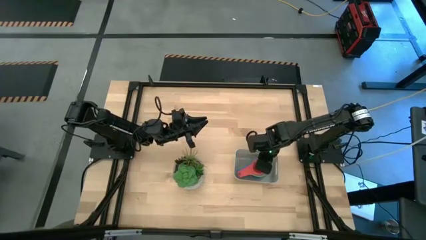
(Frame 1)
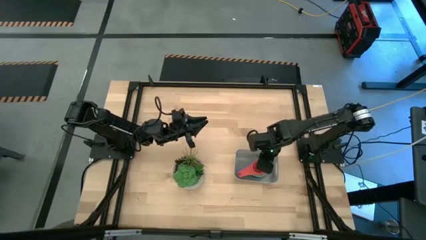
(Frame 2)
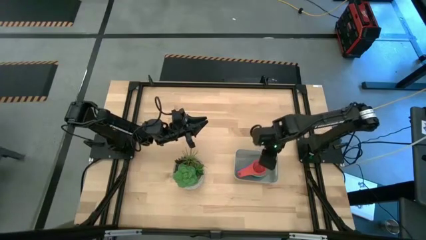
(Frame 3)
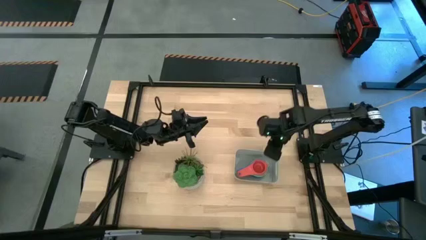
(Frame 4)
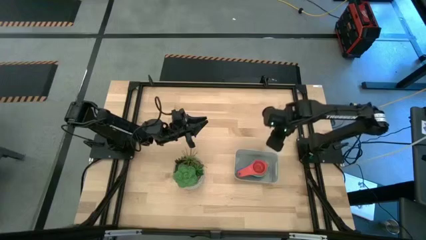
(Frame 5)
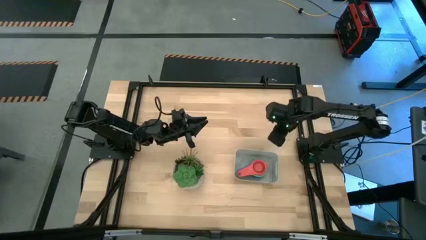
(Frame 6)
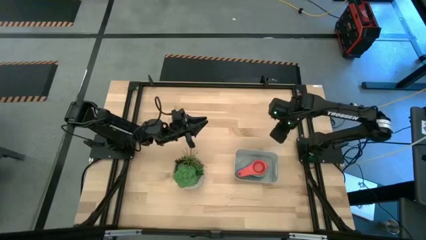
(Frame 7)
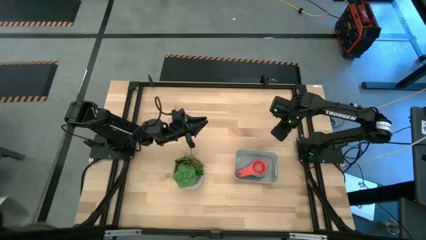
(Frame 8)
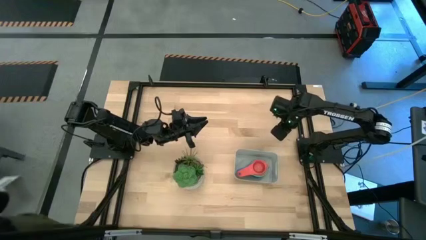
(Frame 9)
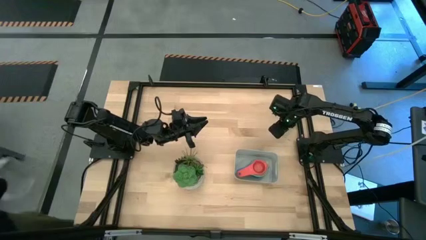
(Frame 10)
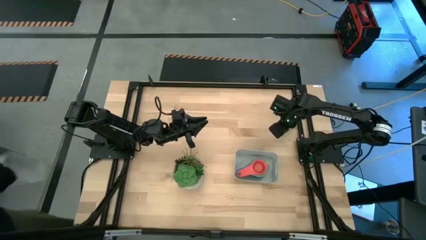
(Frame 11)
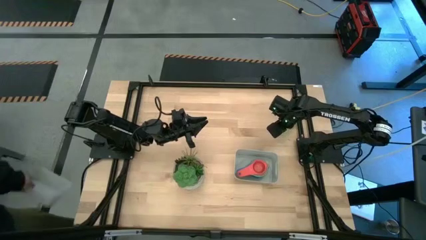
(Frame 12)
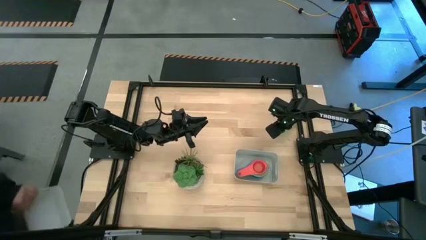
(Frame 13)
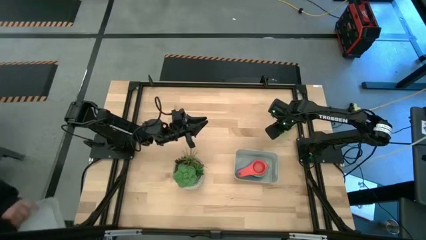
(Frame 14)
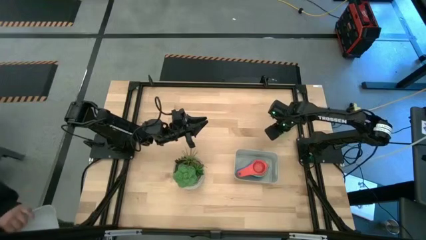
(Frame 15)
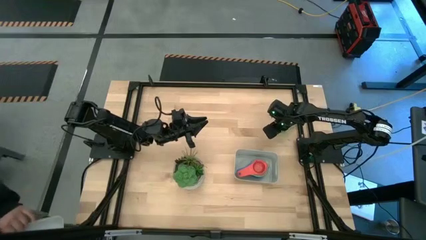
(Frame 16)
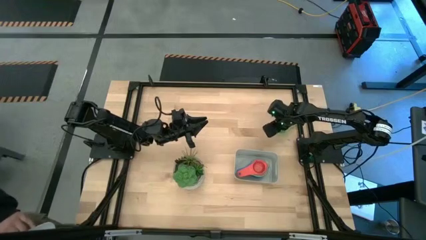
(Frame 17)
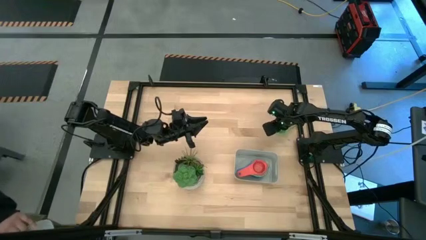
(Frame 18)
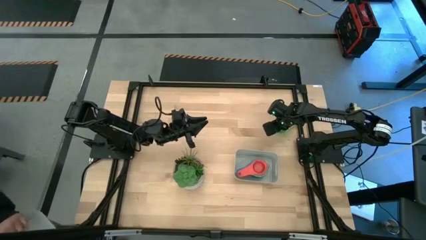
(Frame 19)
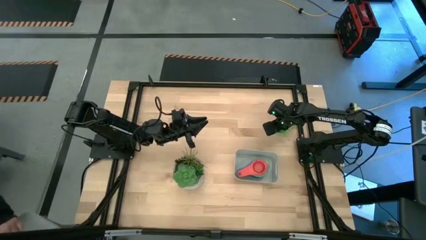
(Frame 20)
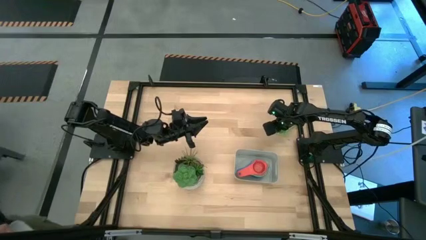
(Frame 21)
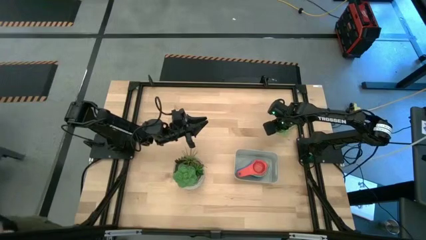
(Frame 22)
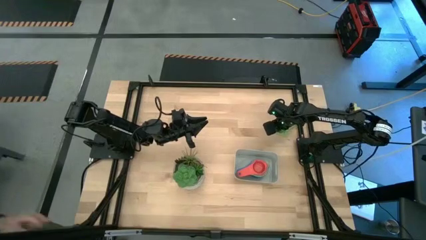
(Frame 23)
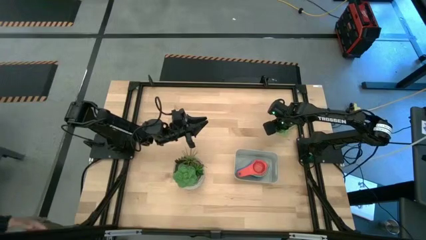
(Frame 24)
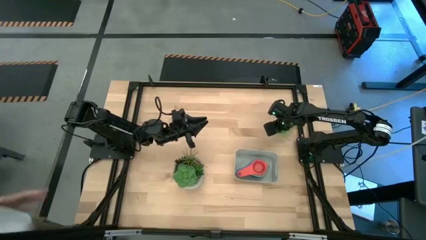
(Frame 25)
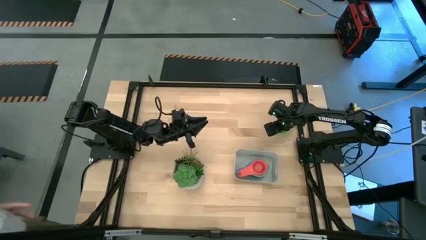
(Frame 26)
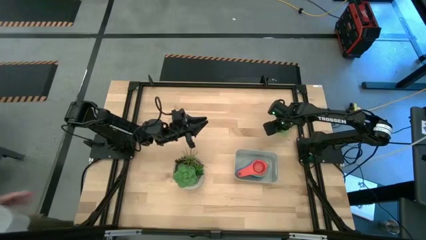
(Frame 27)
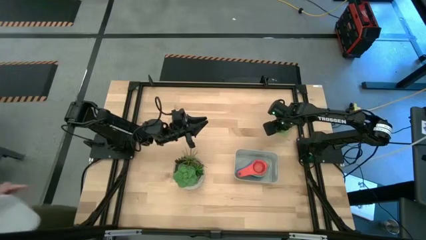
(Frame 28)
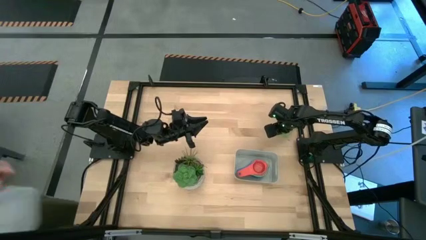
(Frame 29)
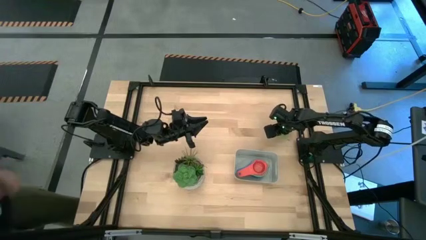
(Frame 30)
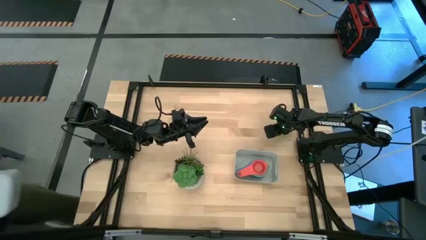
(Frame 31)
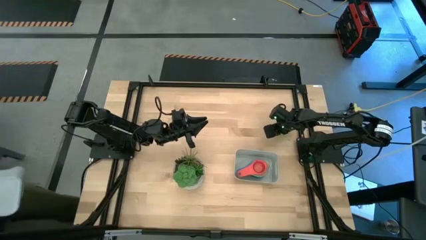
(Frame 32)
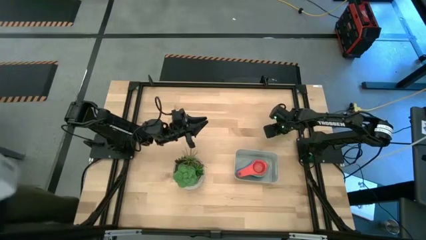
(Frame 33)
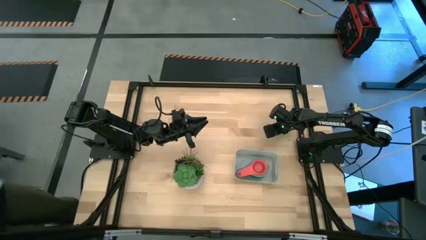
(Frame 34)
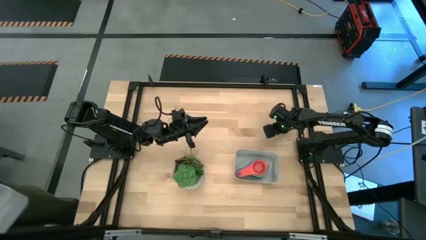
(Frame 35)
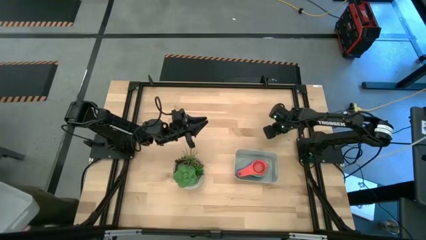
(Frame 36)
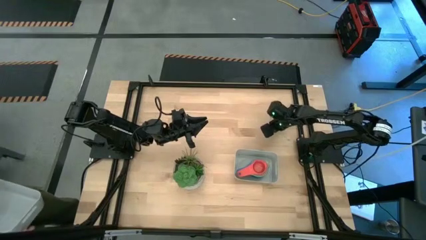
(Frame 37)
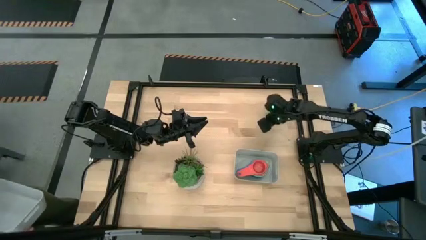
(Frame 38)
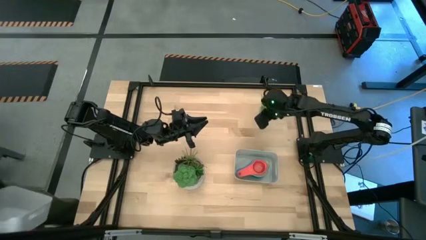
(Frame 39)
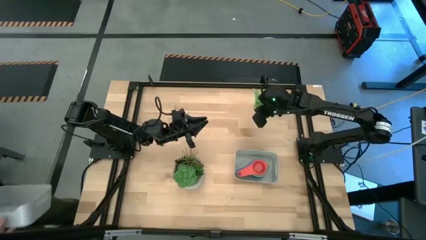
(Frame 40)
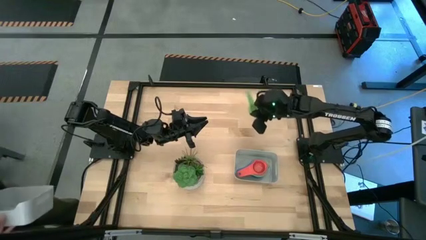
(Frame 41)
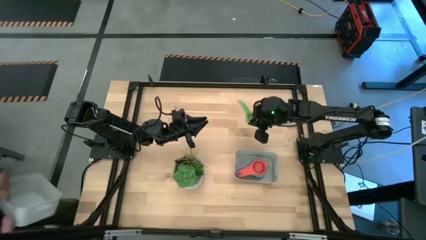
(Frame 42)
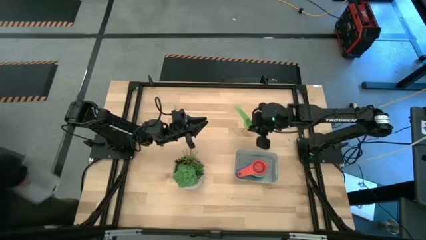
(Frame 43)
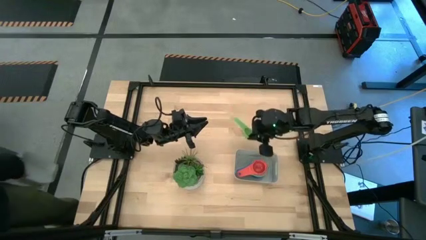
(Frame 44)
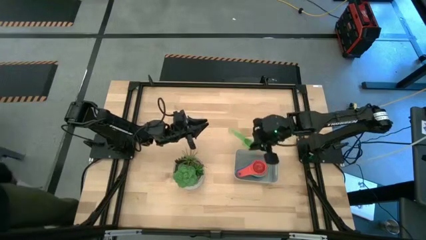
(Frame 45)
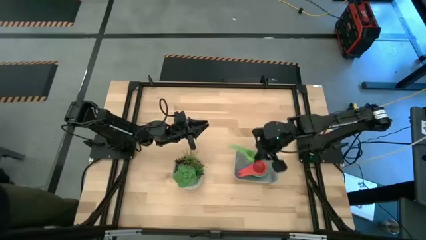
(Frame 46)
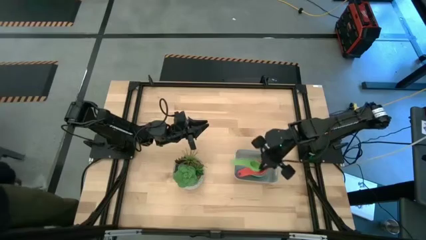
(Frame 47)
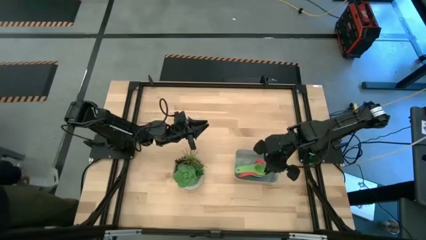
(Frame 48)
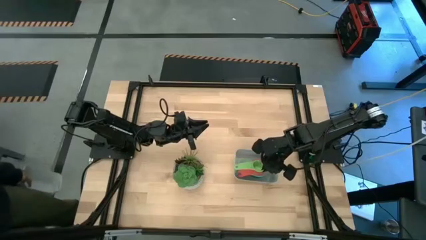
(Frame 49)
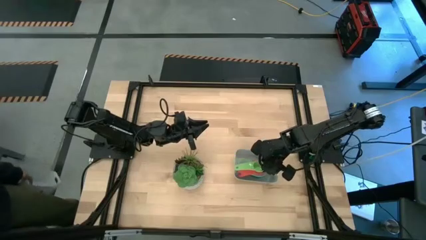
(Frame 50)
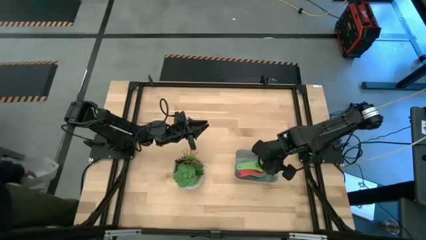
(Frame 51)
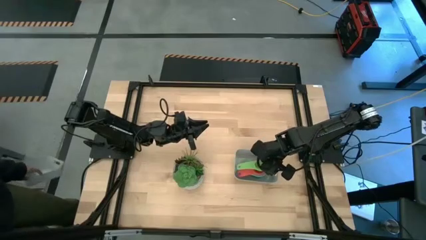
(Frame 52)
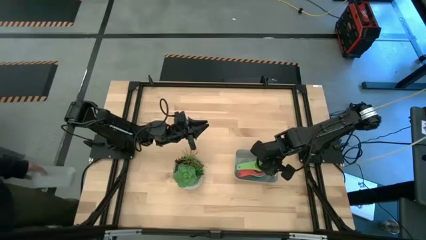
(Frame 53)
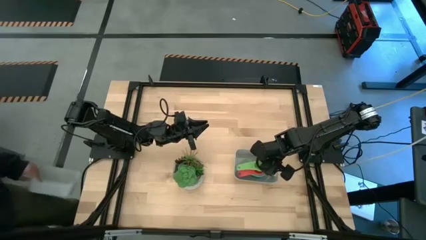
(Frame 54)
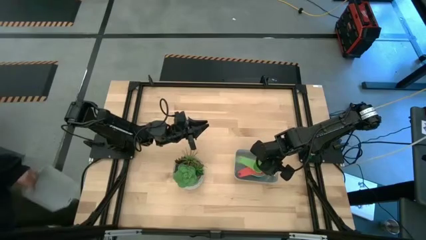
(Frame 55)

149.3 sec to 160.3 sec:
Task: Nest measuring cups in basket
Stack the green measuring cup on top of the orange measuring cup in the grey bin
